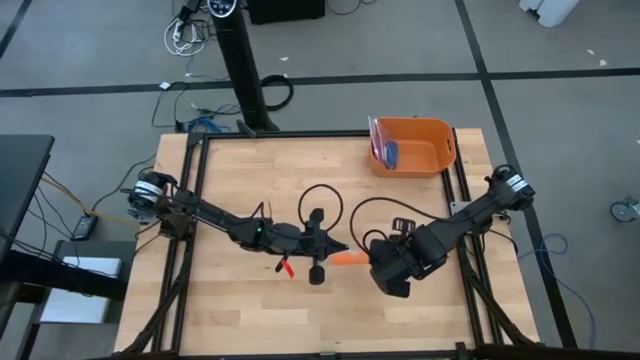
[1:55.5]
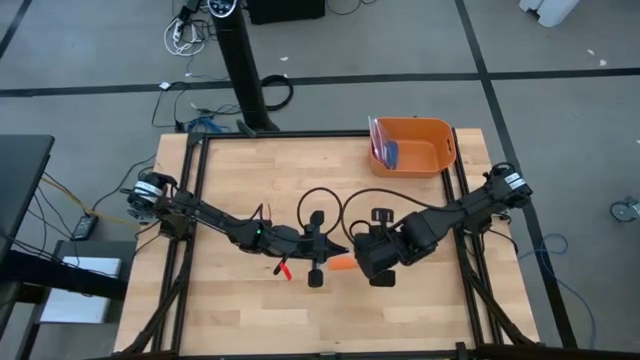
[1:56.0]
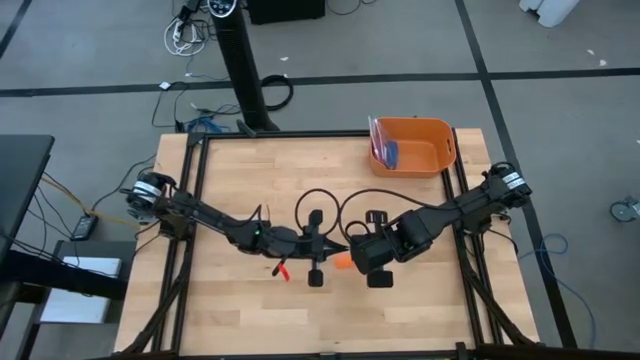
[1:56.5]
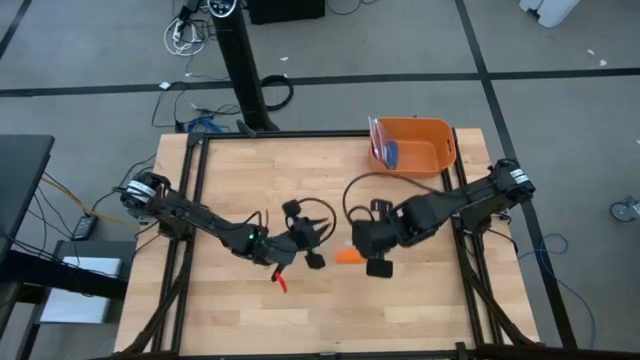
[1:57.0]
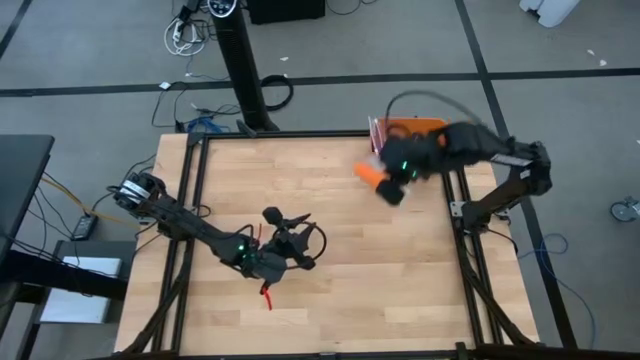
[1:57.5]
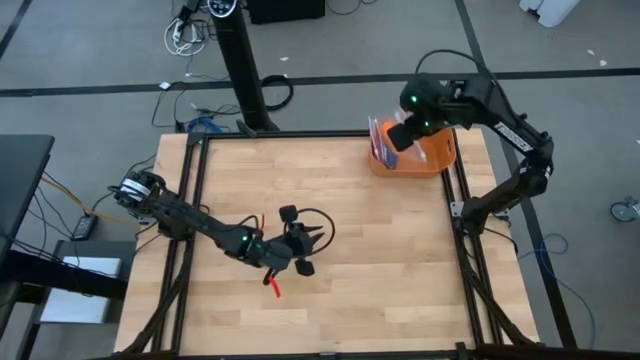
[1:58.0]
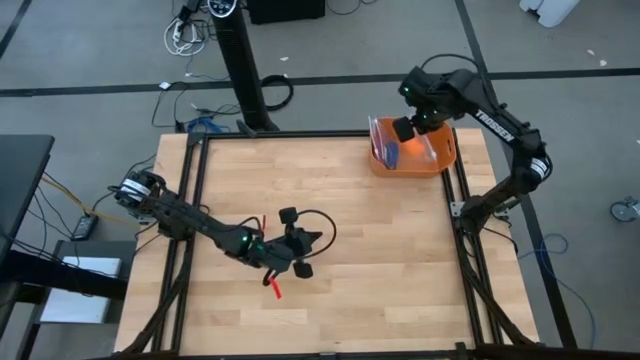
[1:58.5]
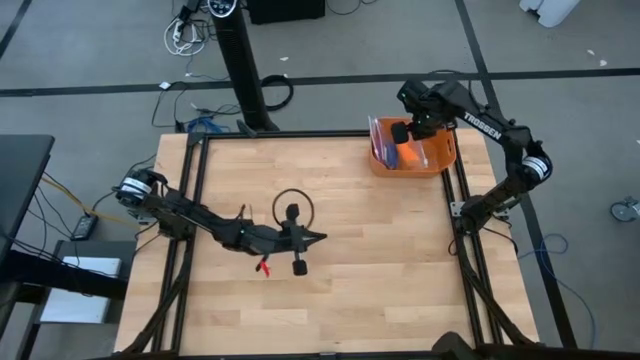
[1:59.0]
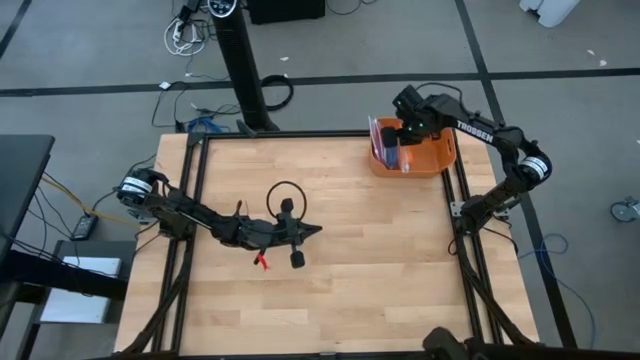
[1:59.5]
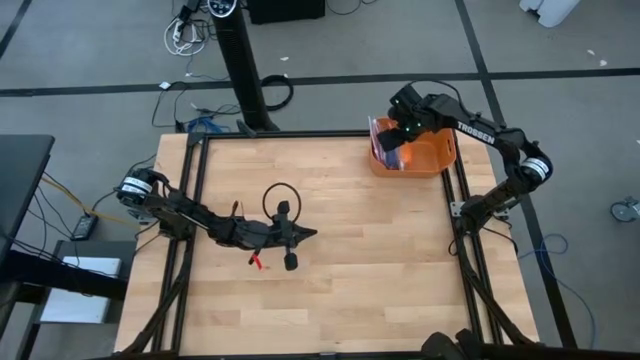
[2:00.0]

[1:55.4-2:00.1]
Task: Roll bandage
Put the transparent zip bag into the orange bin

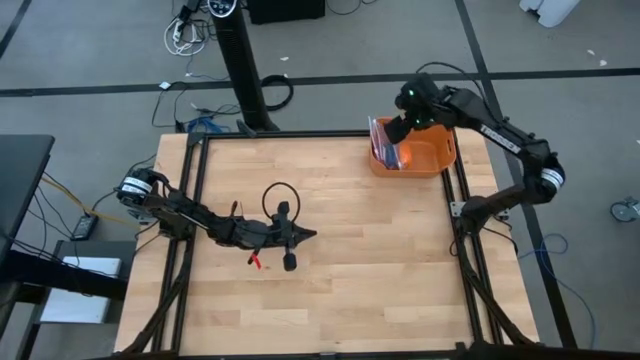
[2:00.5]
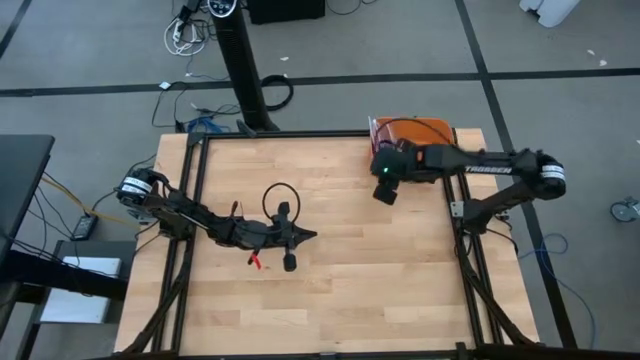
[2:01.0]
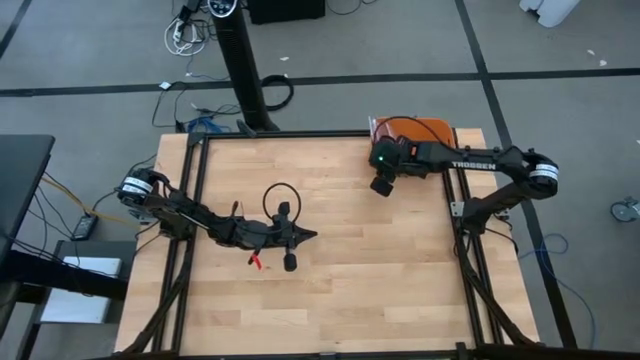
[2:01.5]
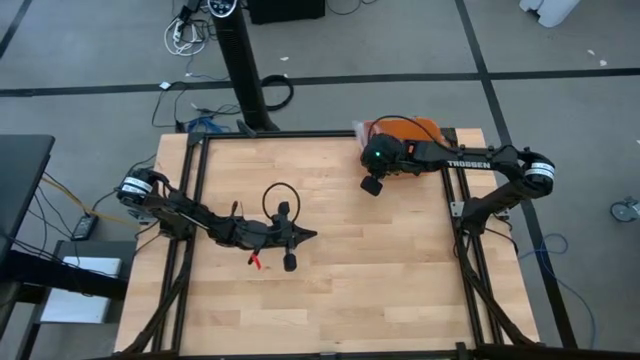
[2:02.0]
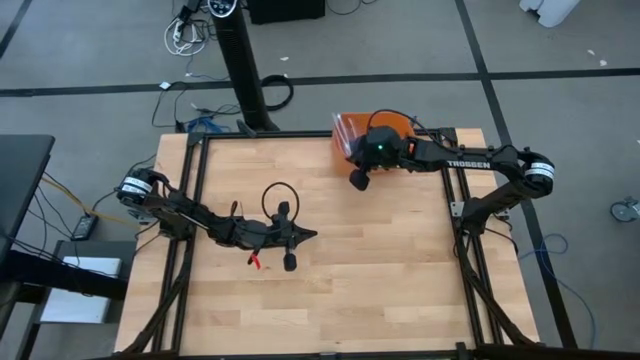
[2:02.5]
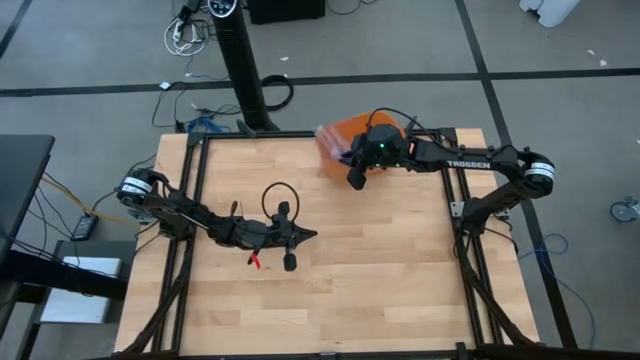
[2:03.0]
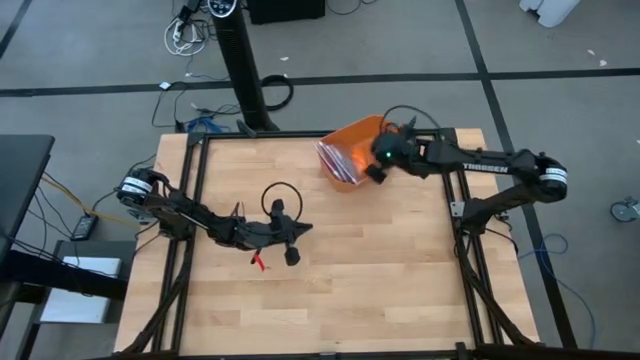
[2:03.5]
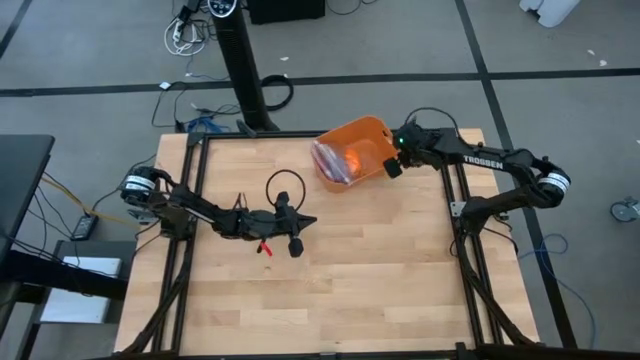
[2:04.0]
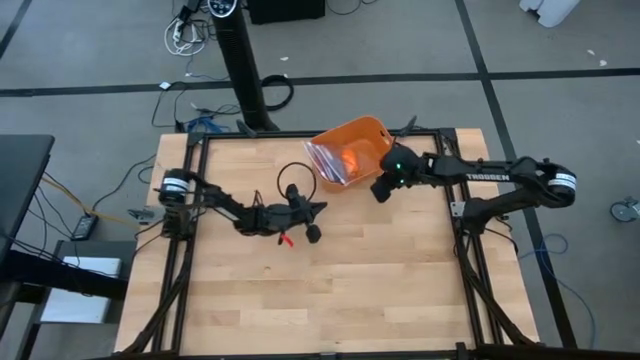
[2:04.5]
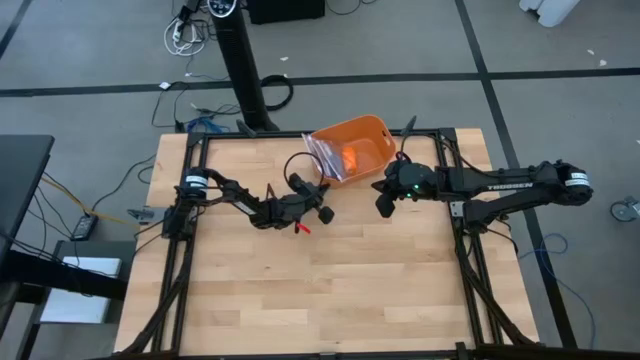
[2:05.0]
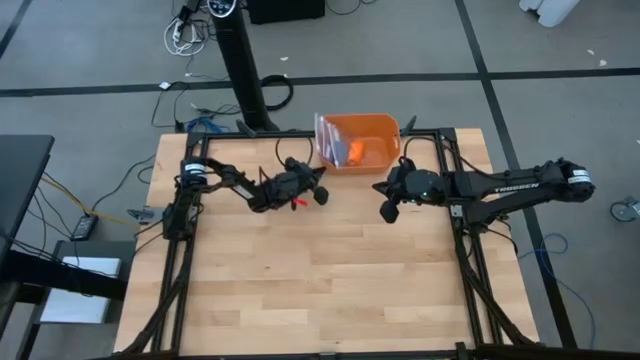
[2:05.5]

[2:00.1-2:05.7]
Move the orange bin to the center of the table

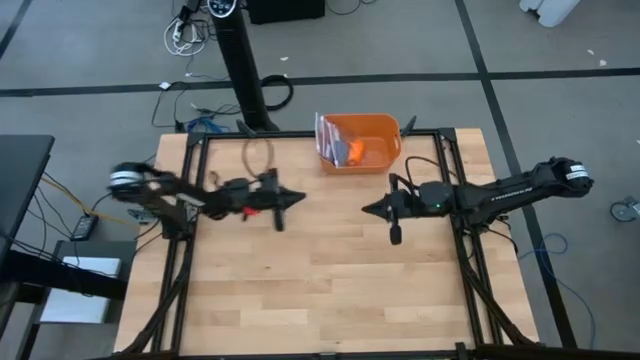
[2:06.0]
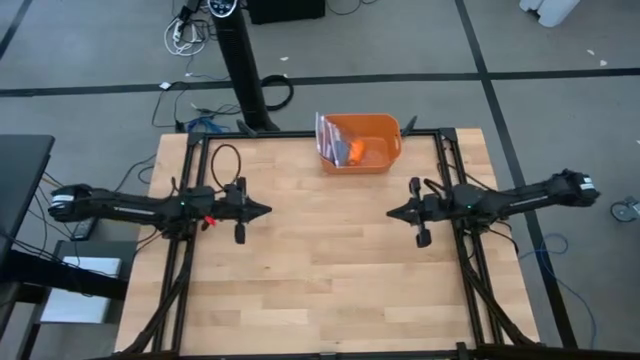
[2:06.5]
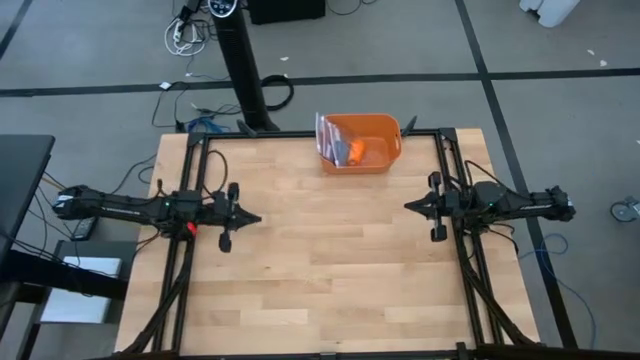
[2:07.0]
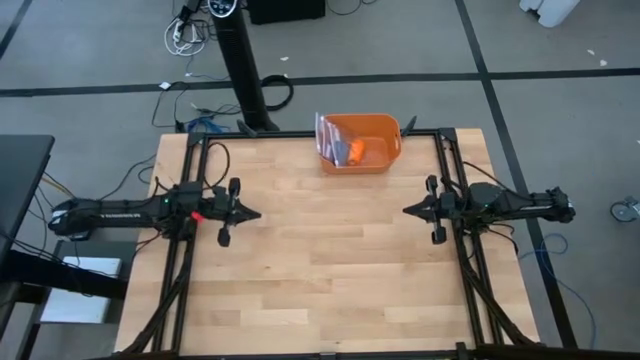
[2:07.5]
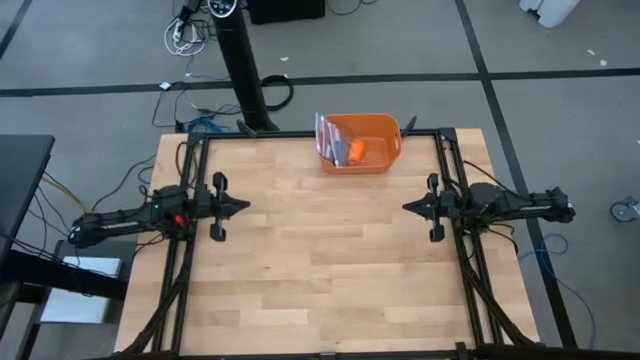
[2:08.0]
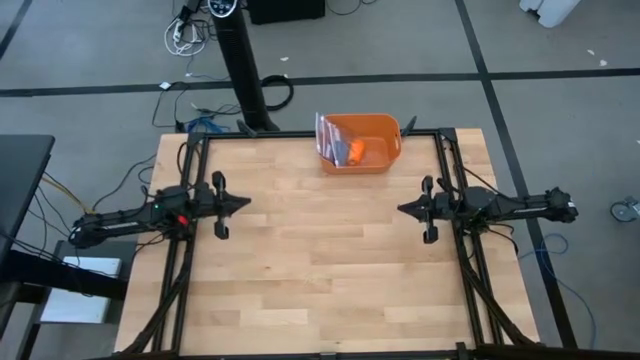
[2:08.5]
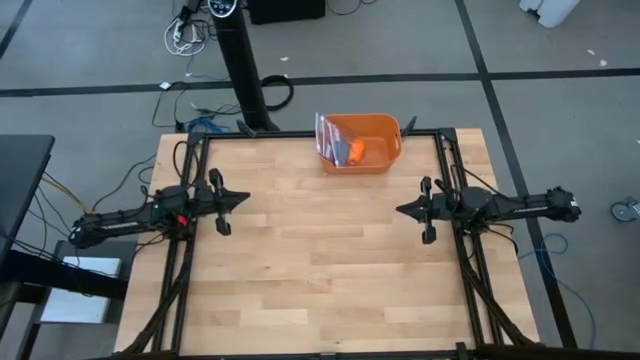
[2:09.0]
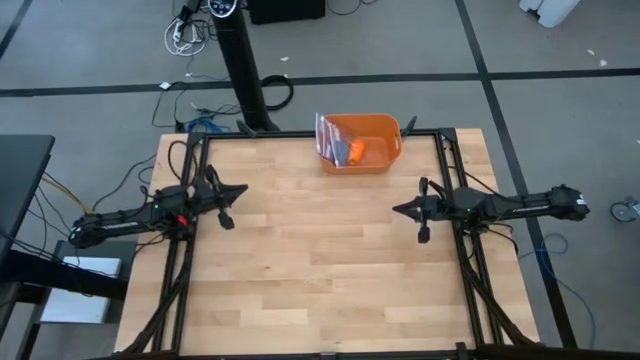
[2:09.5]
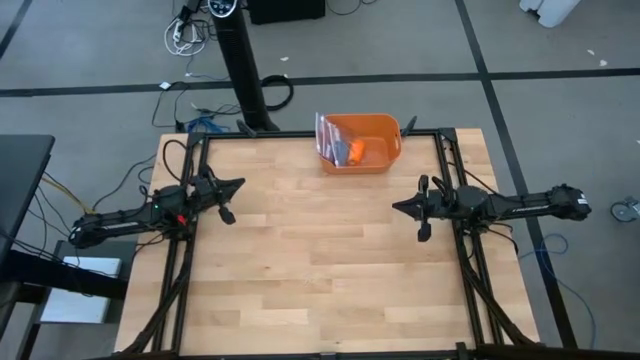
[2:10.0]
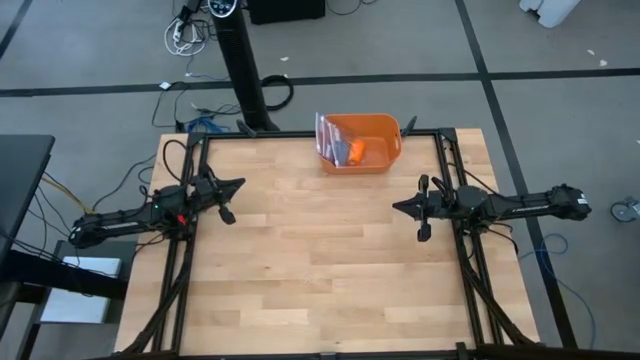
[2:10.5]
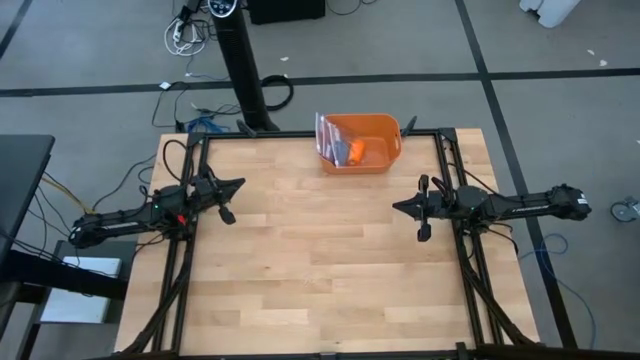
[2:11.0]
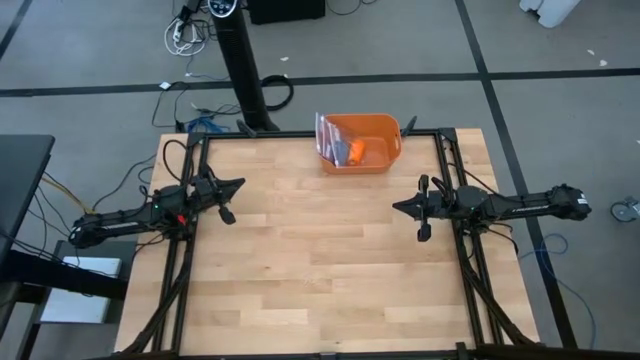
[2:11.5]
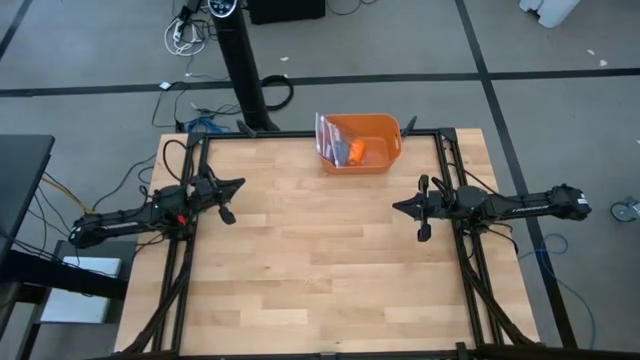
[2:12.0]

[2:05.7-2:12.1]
Return to Home Position

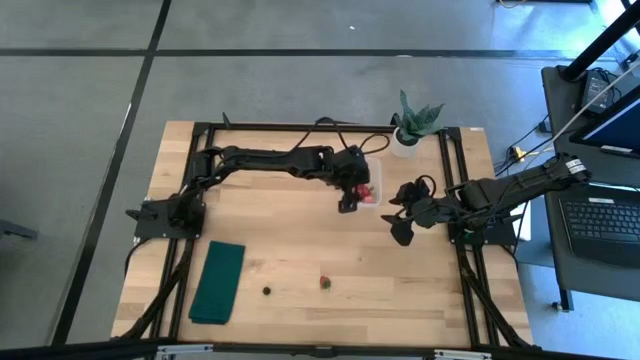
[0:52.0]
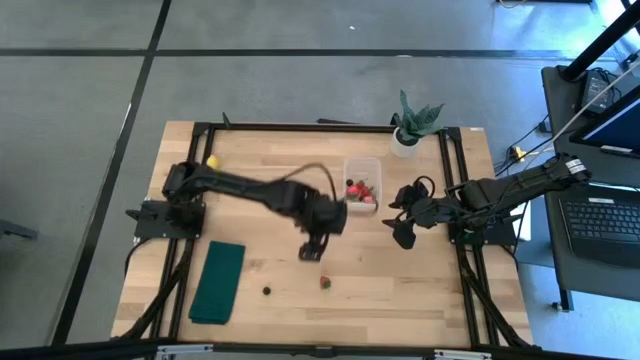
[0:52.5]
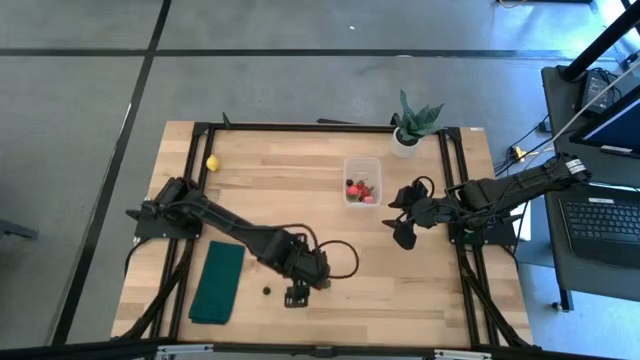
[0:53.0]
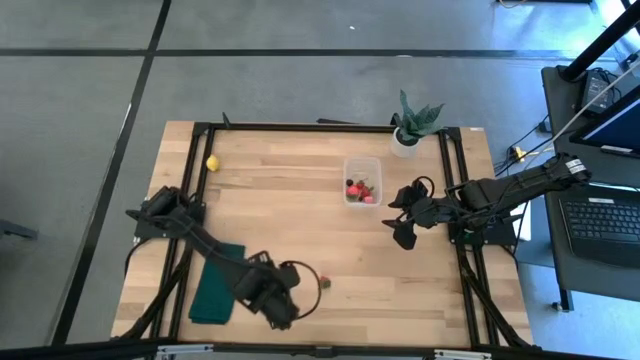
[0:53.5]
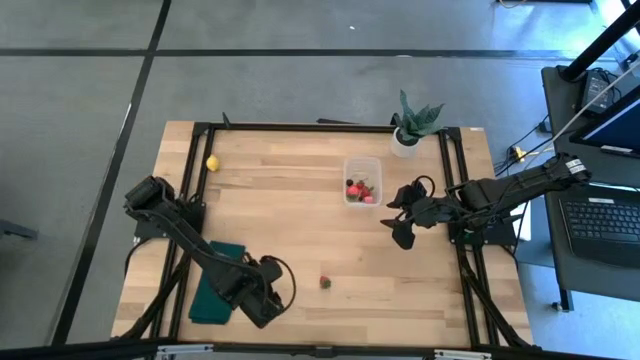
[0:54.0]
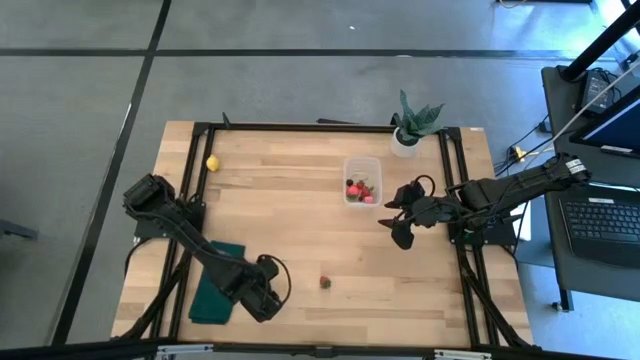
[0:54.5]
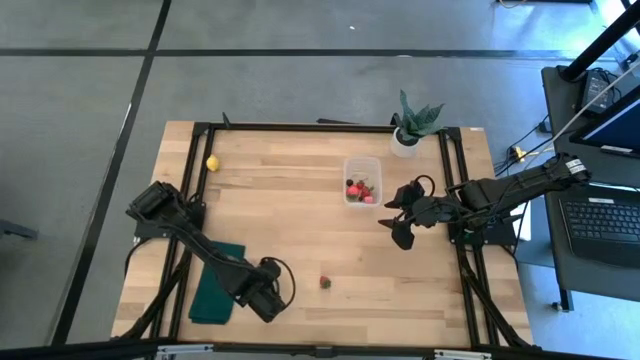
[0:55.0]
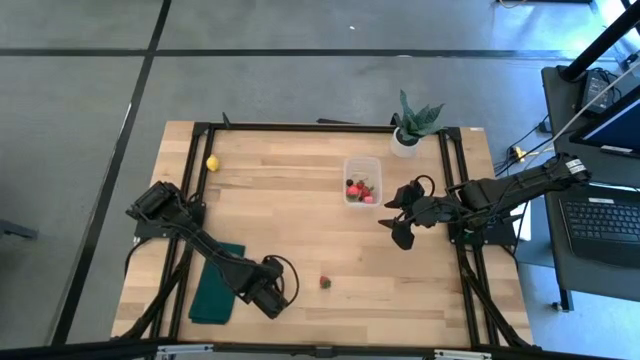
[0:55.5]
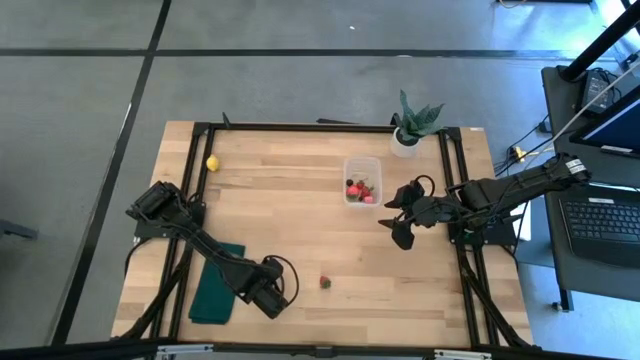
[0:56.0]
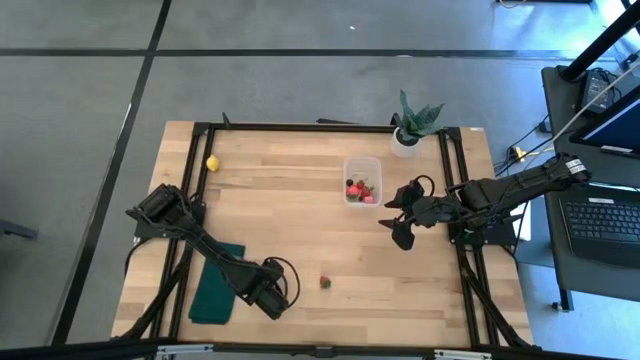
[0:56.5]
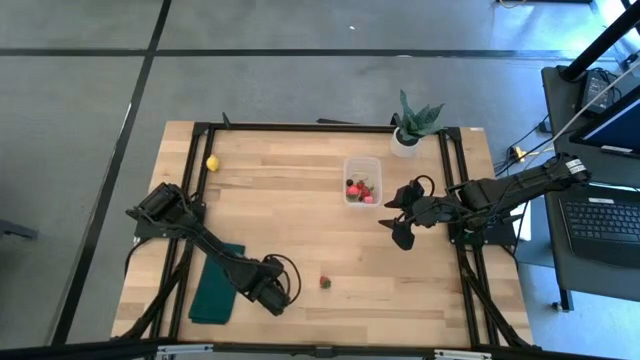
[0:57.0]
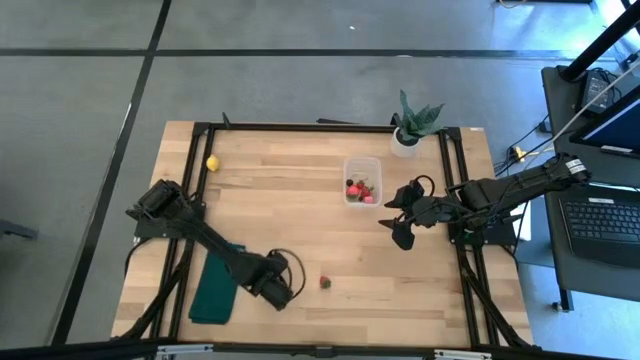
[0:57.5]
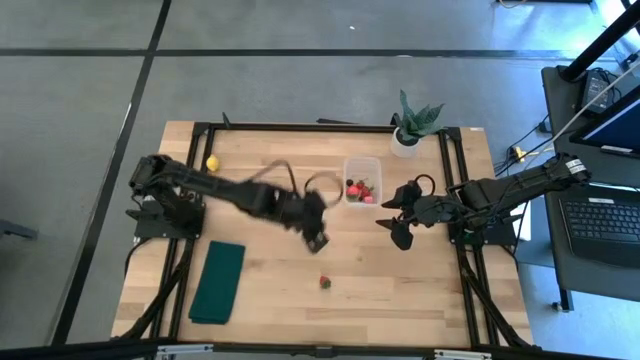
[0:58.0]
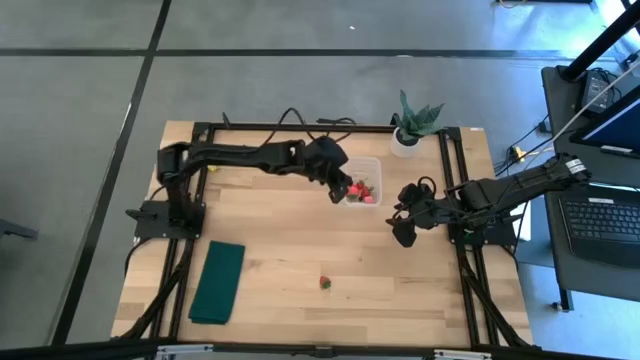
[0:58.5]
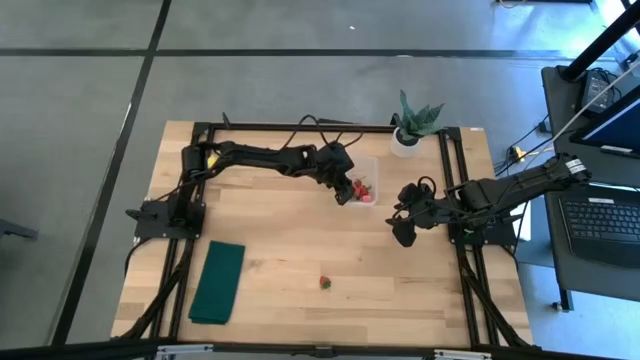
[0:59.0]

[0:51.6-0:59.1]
Task: Pick and placing Produce into tupperware
Put the blackberry into the transparent container
